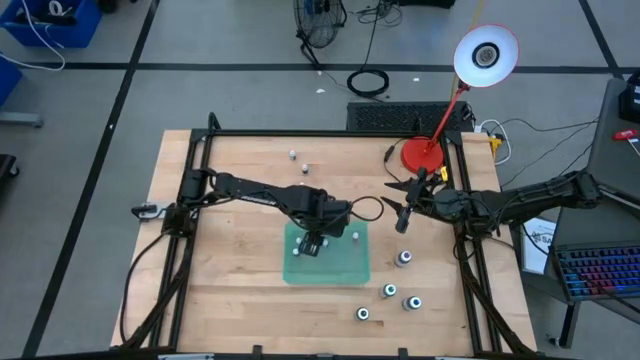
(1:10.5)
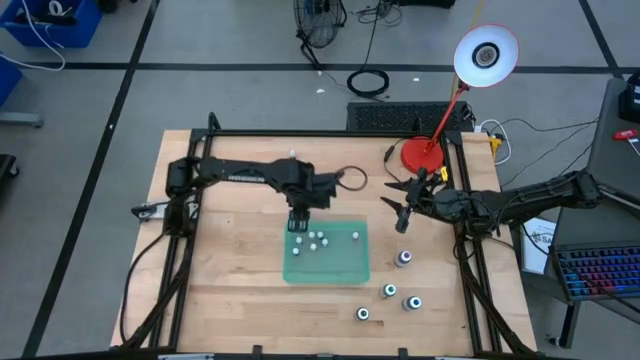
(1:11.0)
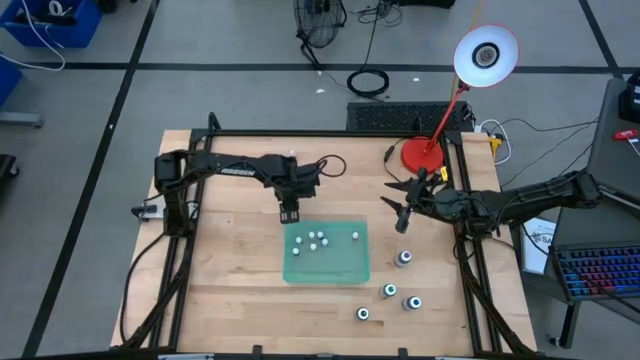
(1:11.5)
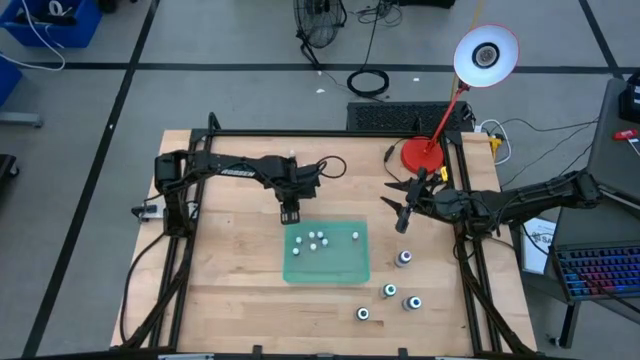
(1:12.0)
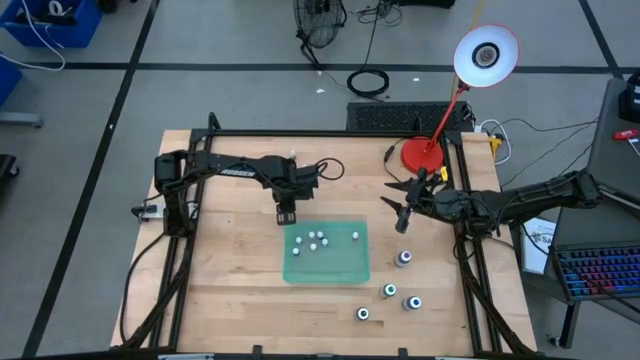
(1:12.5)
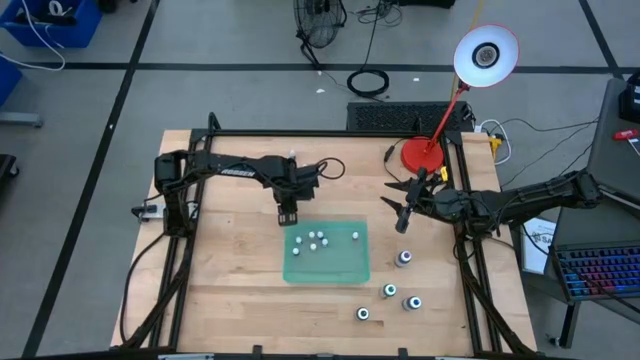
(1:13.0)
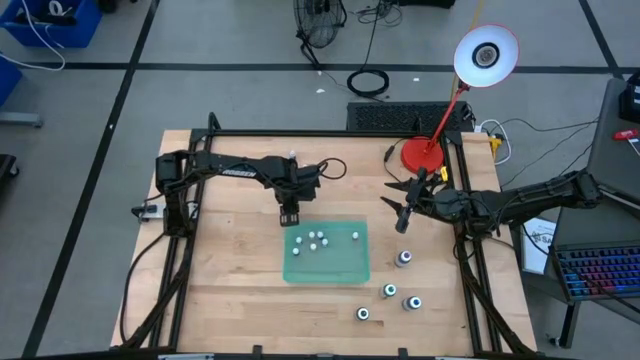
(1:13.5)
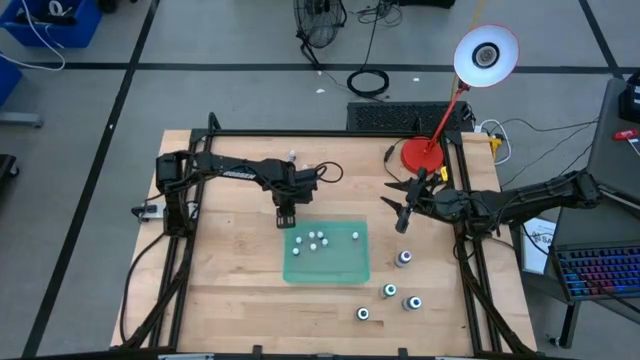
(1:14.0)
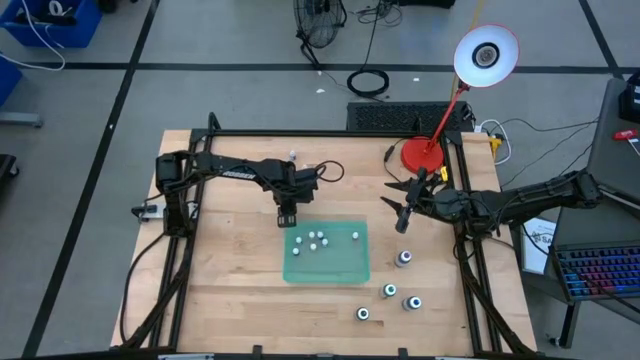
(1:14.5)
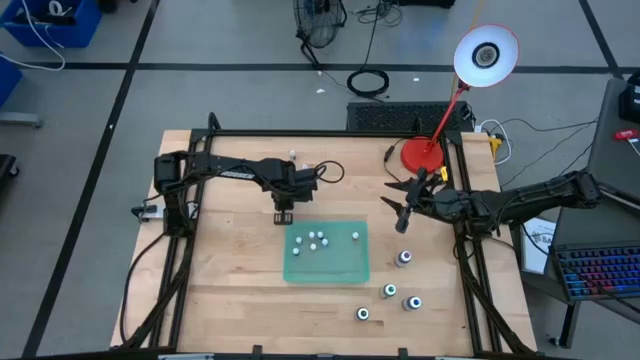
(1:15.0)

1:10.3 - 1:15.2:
Task: Pick & Place food coloring
Put the small red food coloring bottle into the blue bin

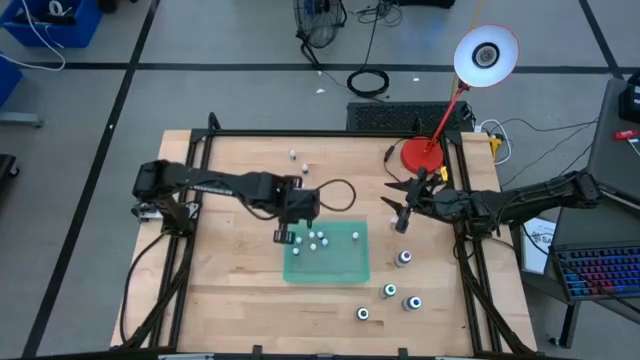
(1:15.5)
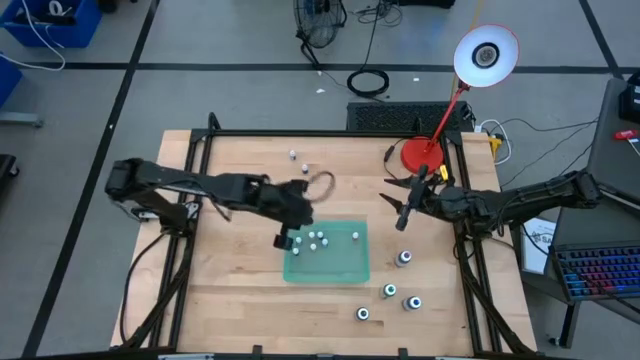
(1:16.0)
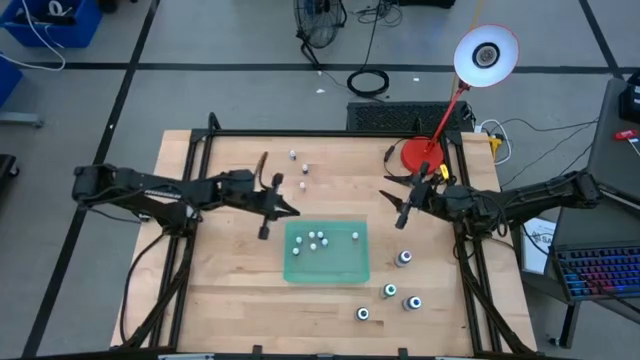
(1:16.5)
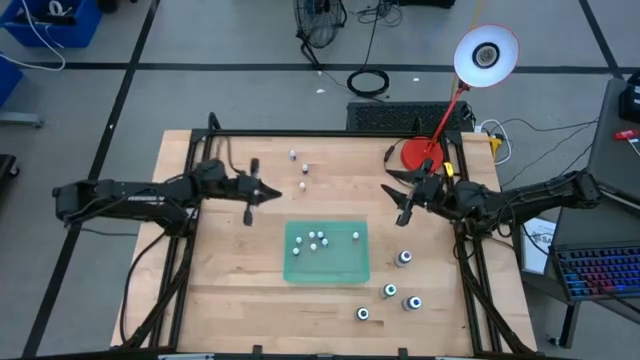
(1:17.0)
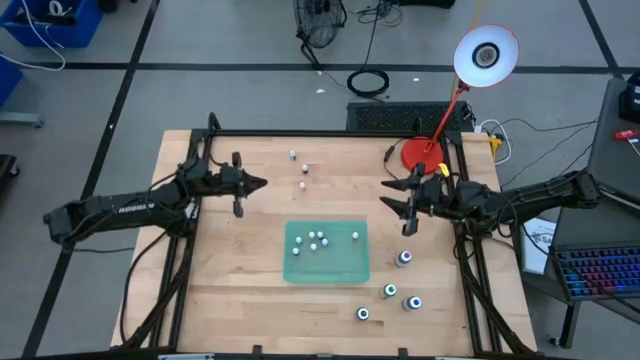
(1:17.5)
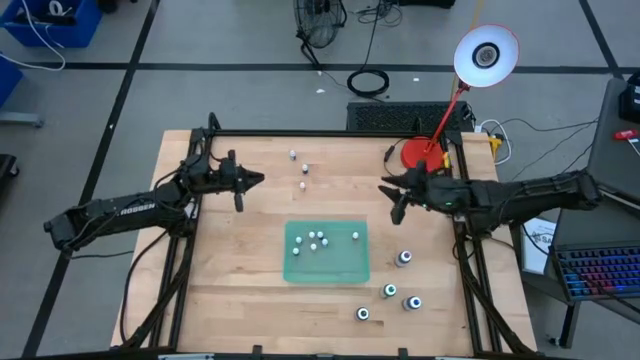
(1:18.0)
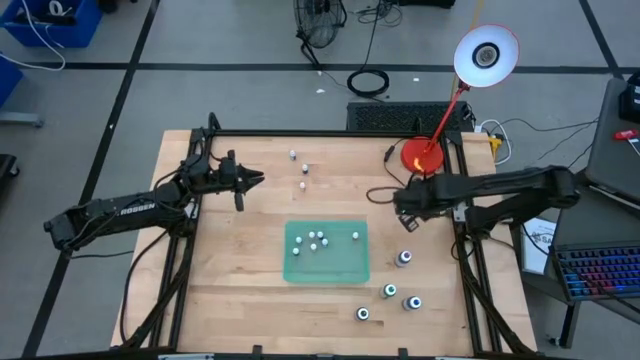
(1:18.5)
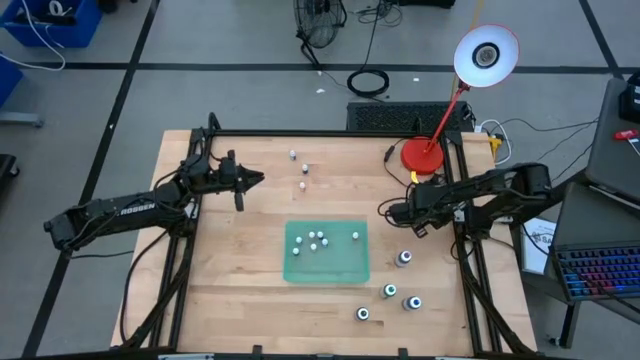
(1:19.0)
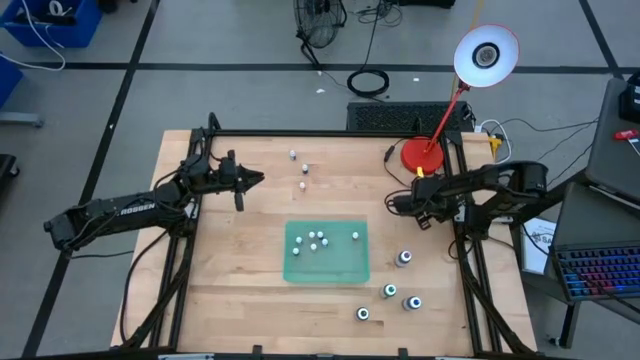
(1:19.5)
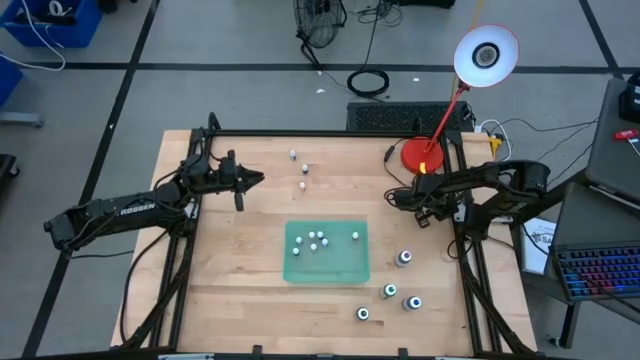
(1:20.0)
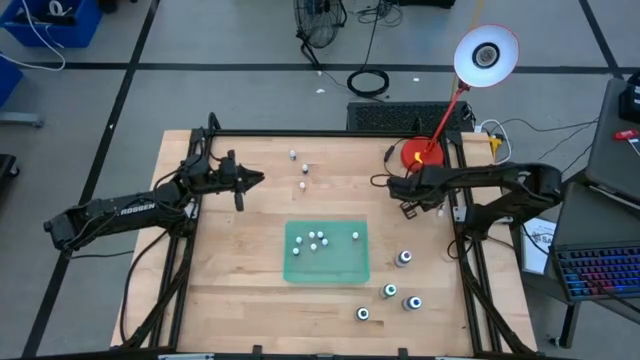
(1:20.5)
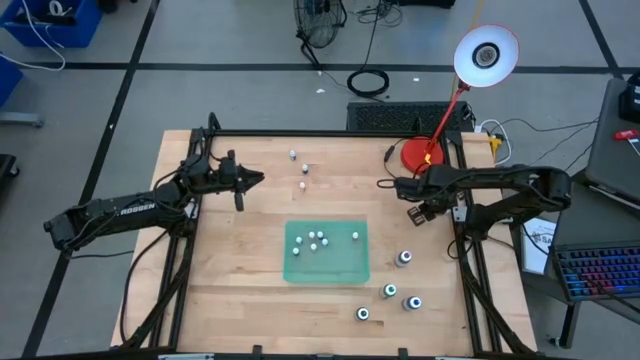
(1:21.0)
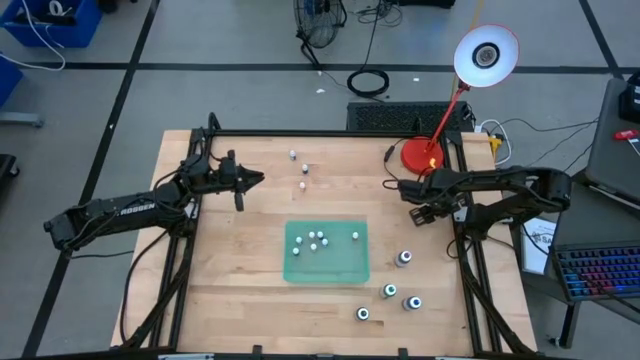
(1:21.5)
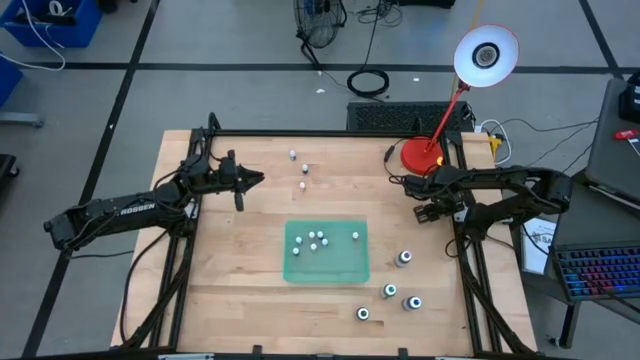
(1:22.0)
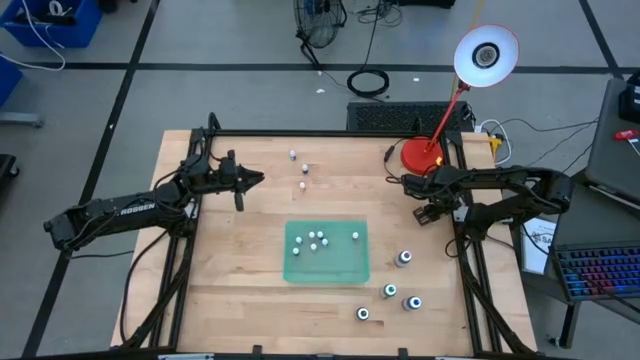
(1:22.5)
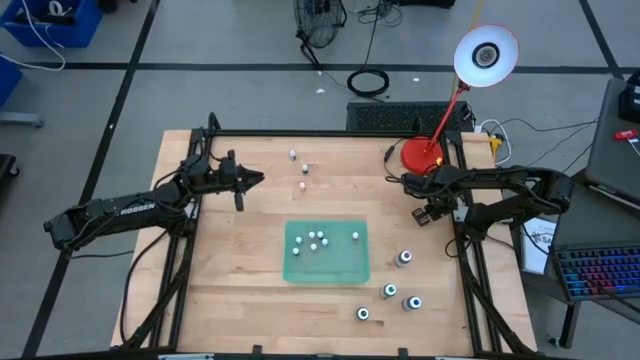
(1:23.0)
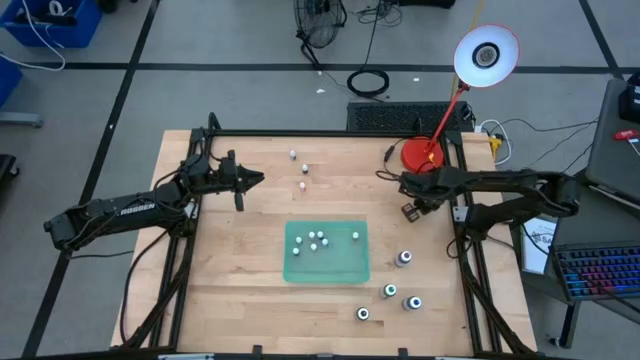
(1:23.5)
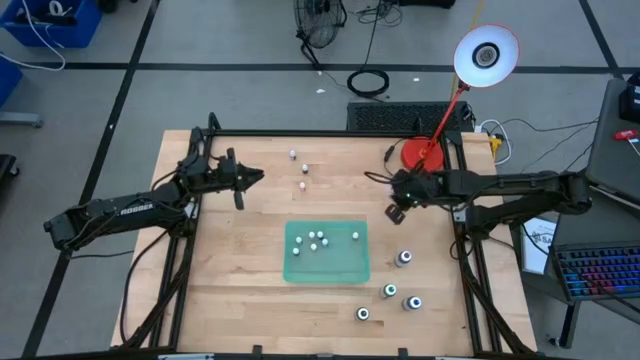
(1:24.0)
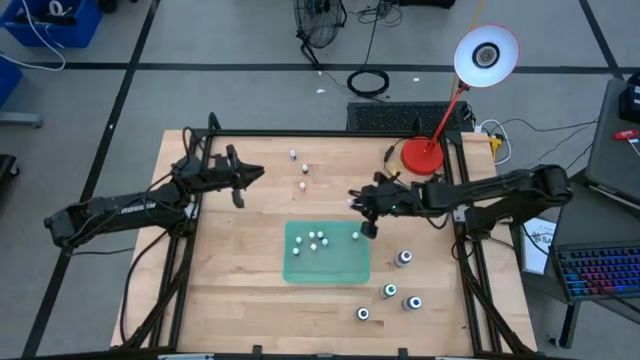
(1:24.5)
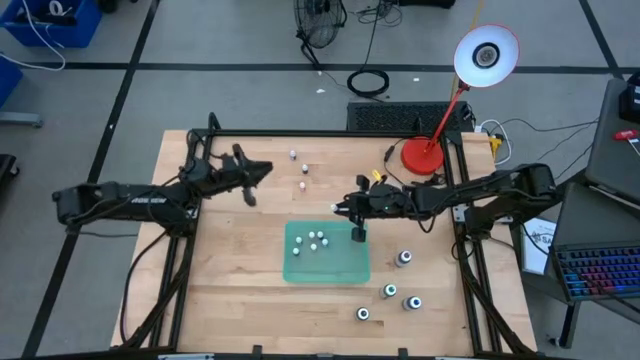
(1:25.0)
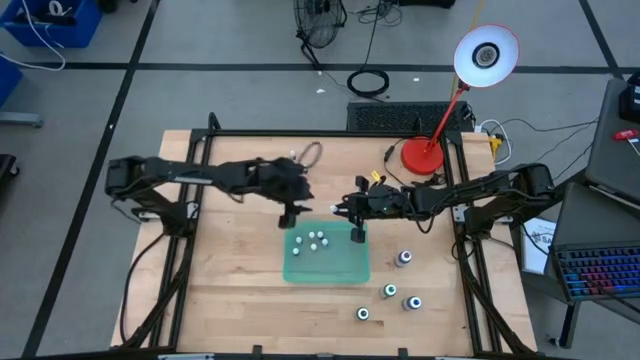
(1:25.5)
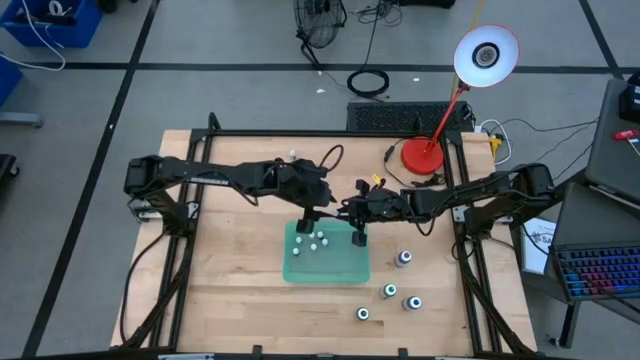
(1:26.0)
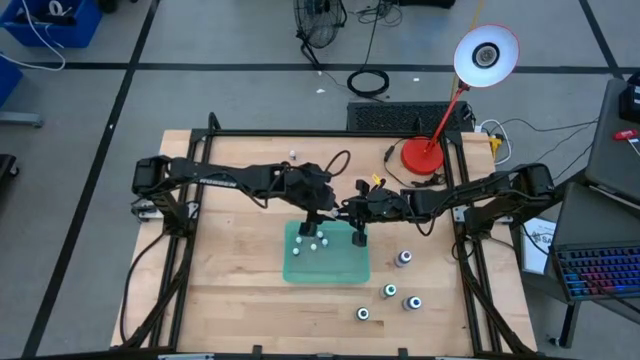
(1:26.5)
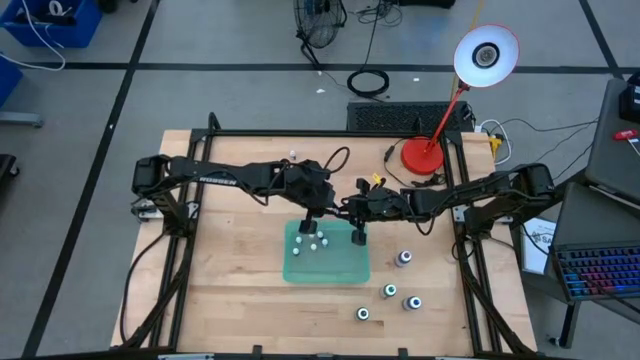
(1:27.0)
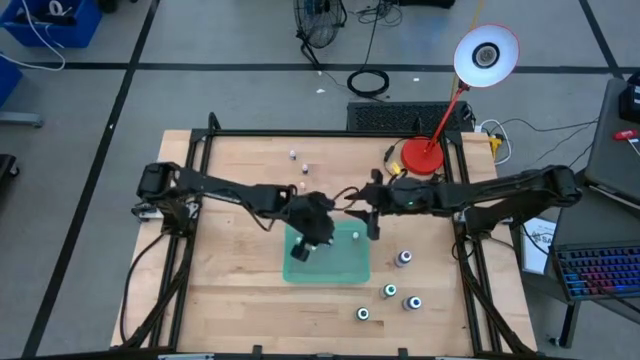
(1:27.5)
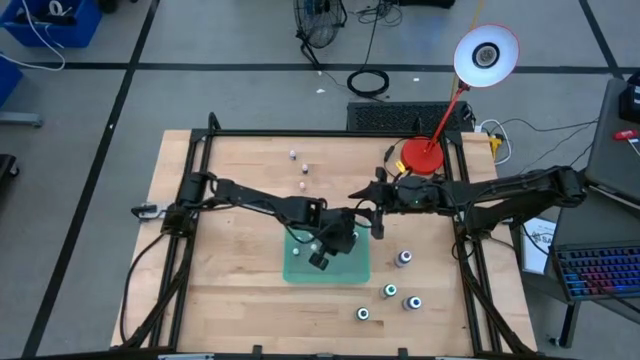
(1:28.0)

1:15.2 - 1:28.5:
Put the small red food coloring bottle into the blue bin

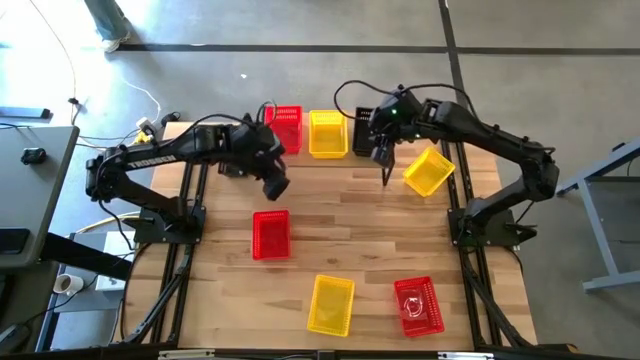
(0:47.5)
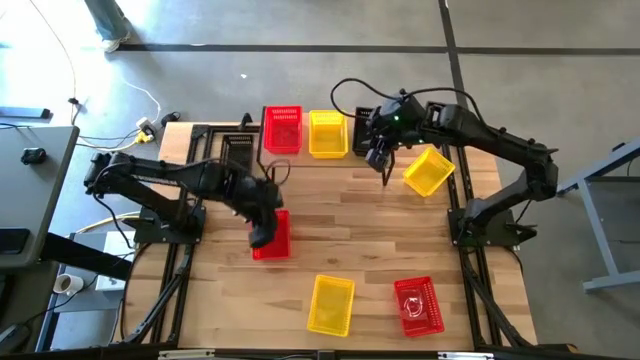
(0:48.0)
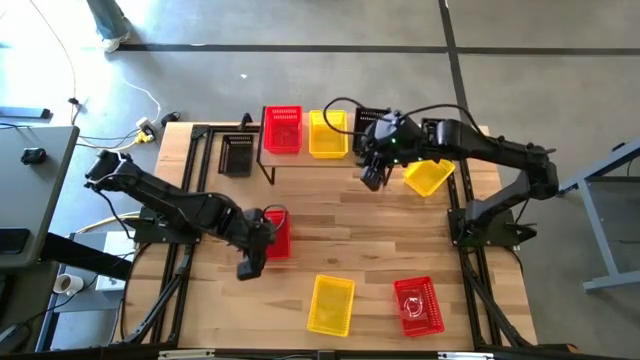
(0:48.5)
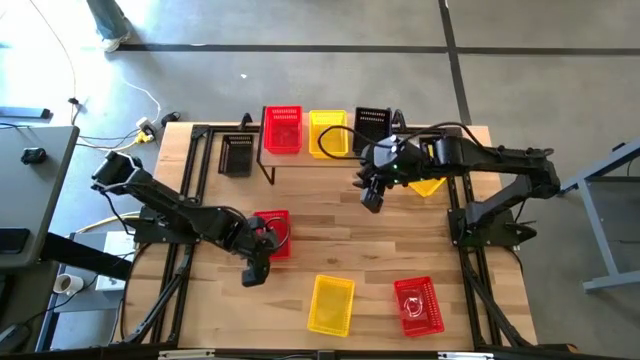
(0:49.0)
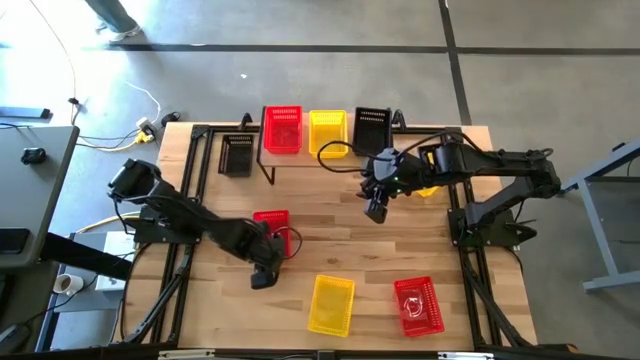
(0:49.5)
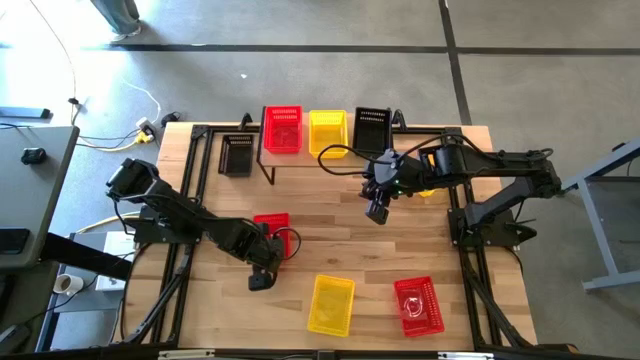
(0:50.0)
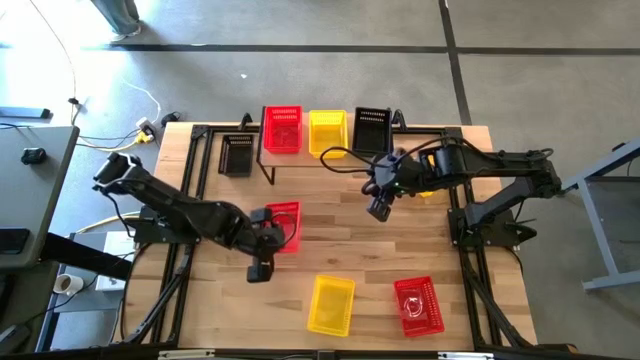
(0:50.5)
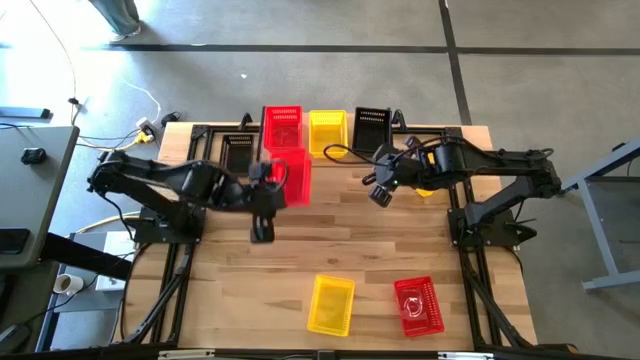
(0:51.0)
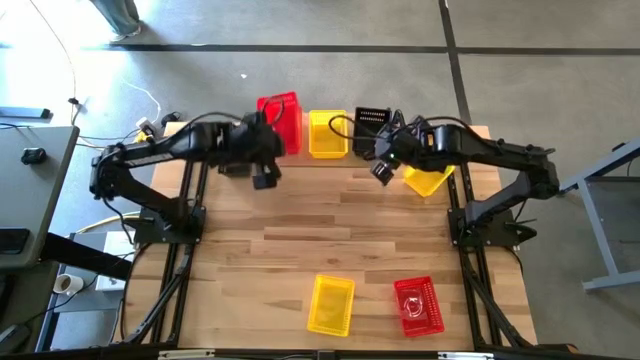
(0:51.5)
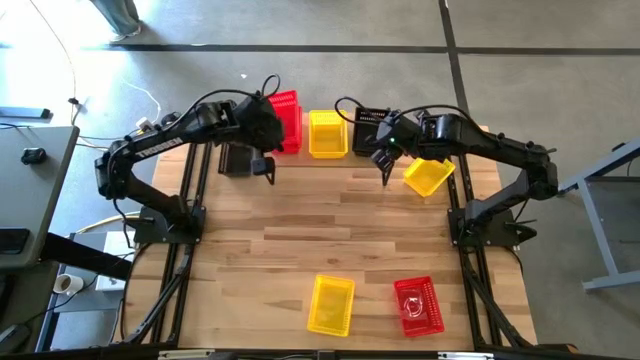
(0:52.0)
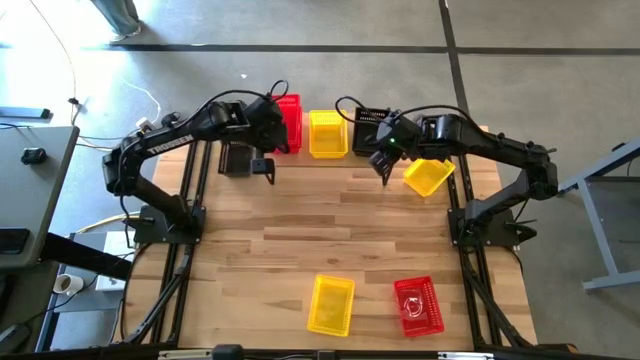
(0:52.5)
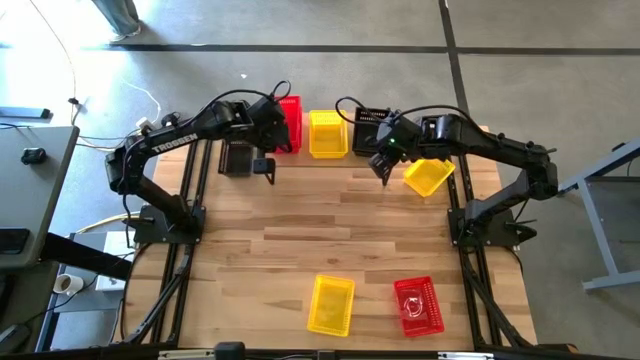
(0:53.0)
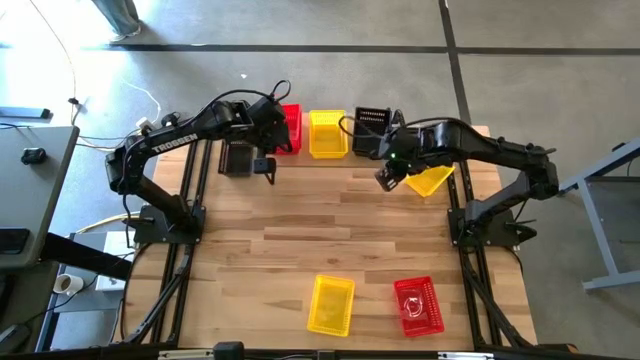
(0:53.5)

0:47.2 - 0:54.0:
Task: Stack baskets on shelf by color
Stack the top red bin on top of the other red bin on the shelf
